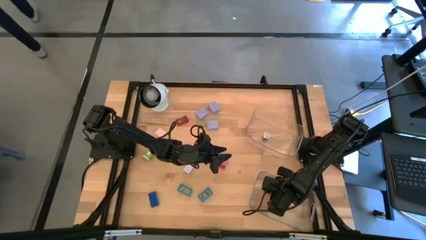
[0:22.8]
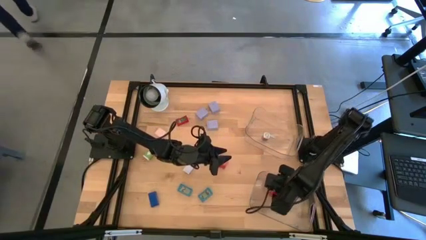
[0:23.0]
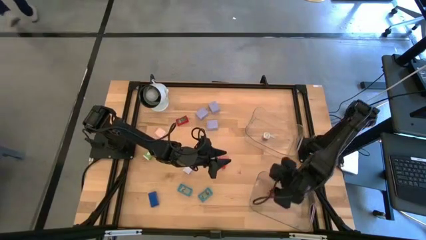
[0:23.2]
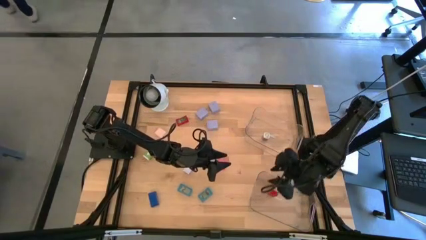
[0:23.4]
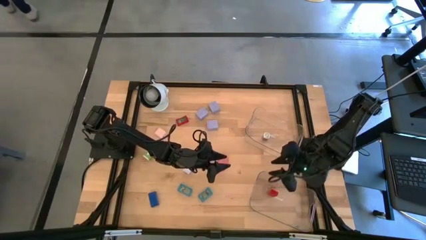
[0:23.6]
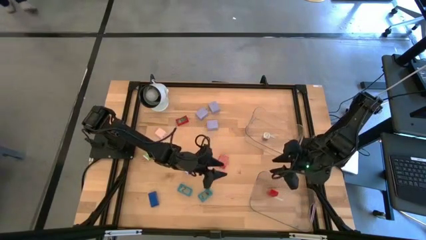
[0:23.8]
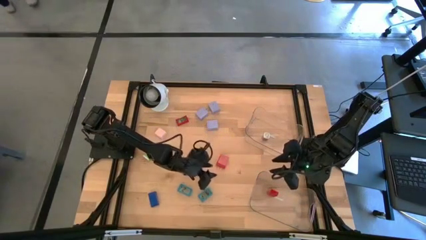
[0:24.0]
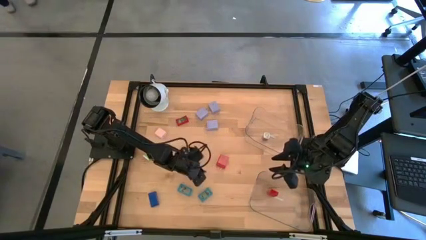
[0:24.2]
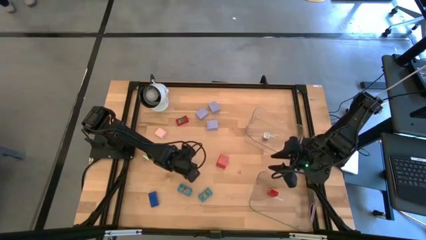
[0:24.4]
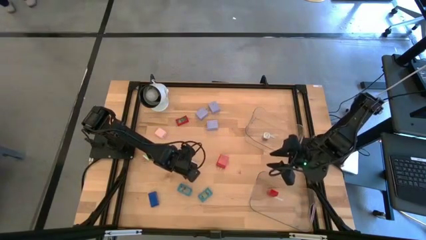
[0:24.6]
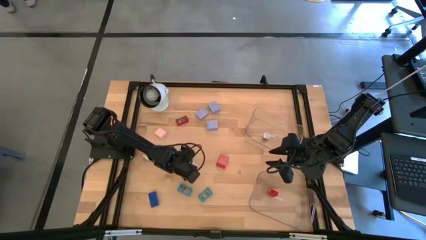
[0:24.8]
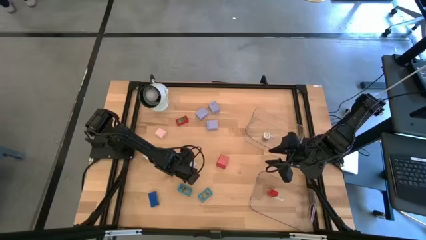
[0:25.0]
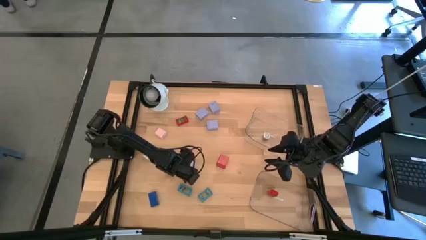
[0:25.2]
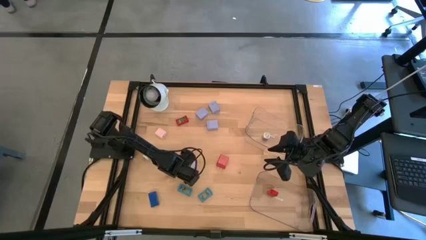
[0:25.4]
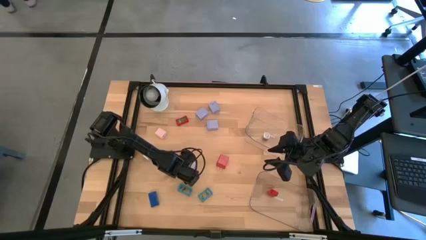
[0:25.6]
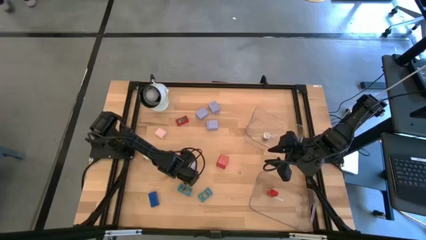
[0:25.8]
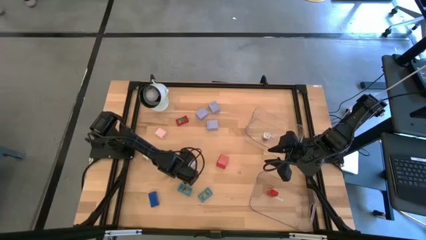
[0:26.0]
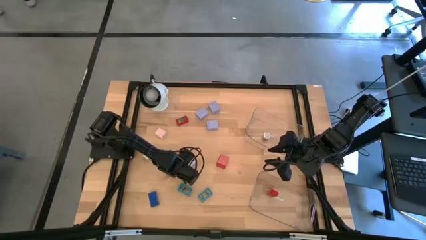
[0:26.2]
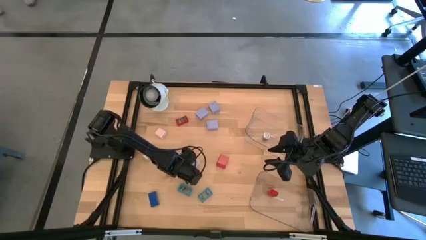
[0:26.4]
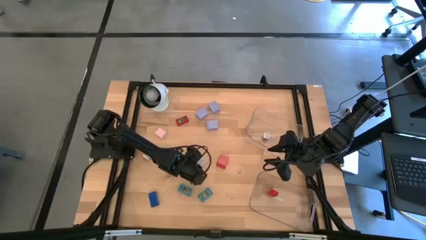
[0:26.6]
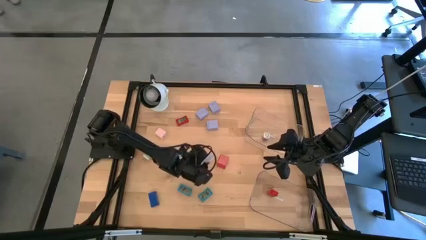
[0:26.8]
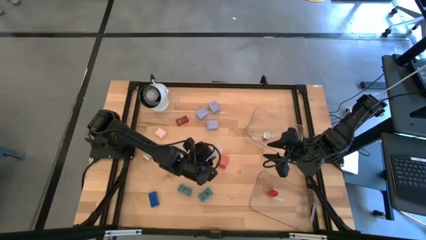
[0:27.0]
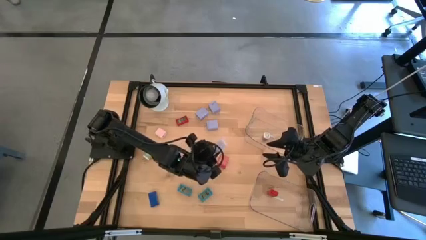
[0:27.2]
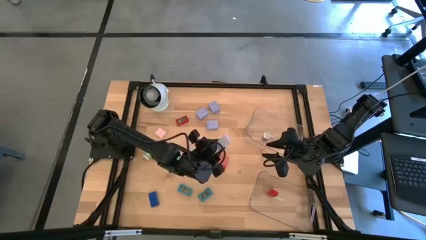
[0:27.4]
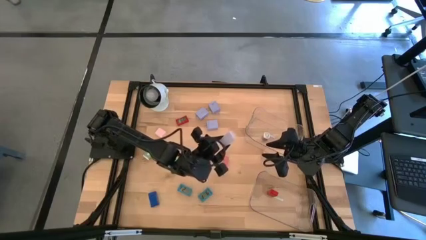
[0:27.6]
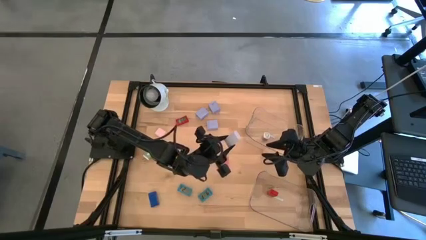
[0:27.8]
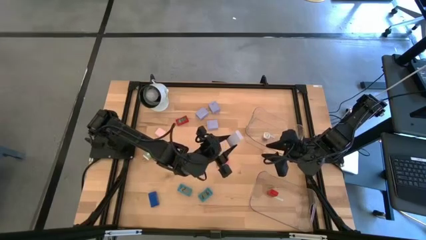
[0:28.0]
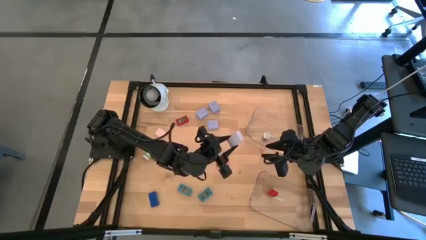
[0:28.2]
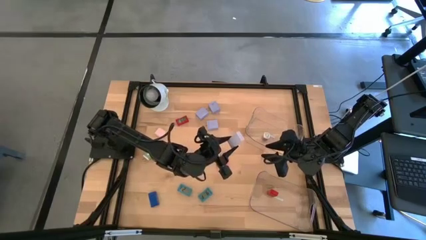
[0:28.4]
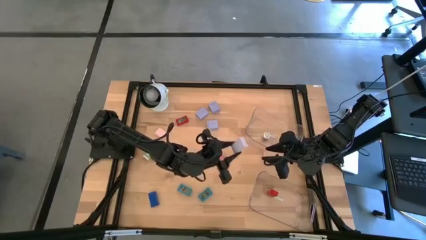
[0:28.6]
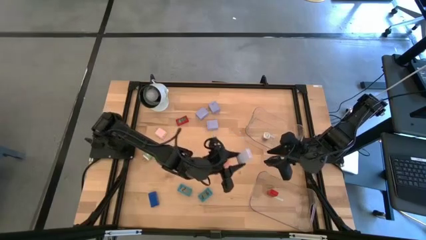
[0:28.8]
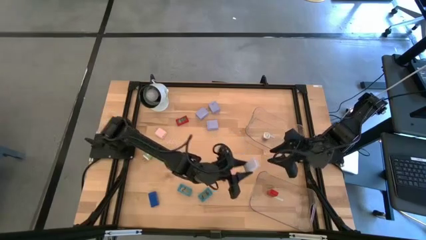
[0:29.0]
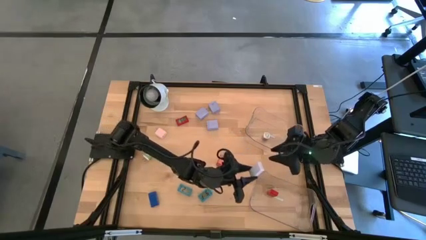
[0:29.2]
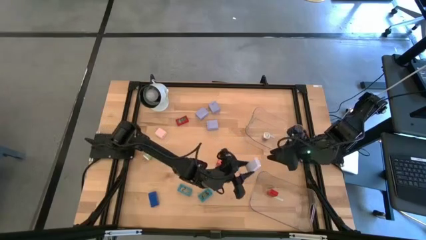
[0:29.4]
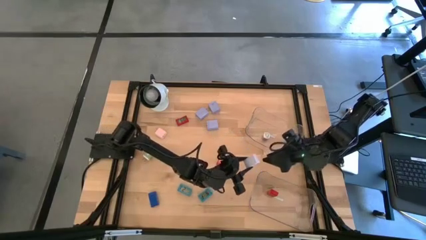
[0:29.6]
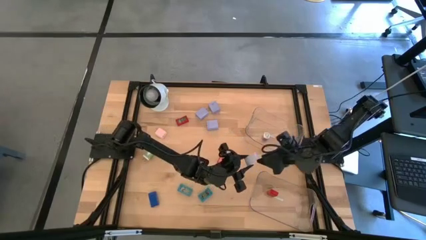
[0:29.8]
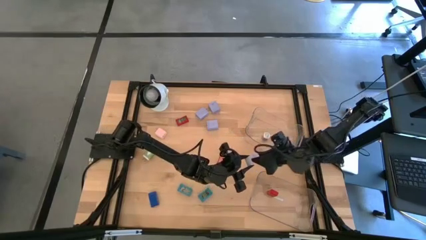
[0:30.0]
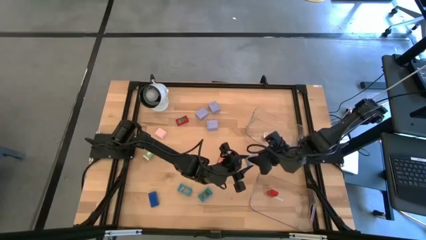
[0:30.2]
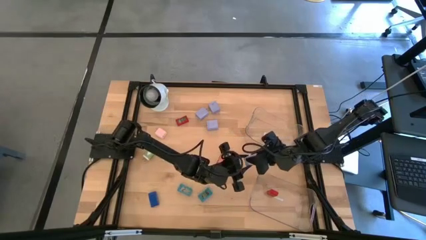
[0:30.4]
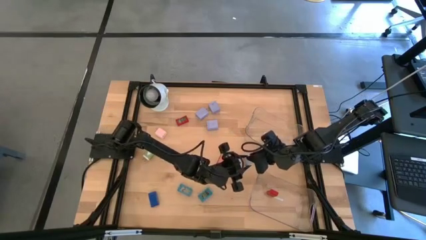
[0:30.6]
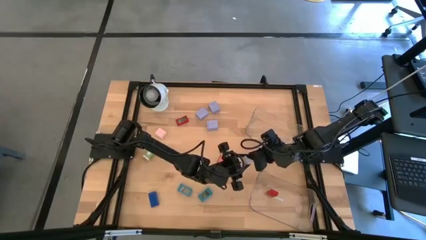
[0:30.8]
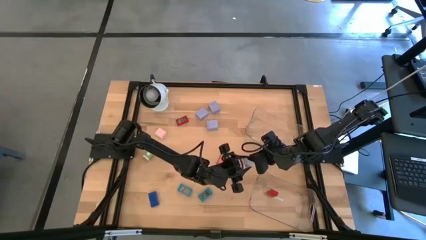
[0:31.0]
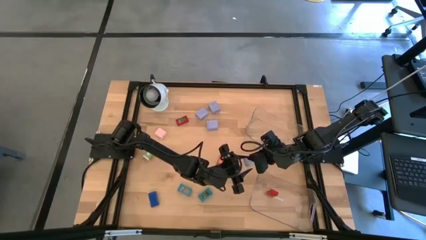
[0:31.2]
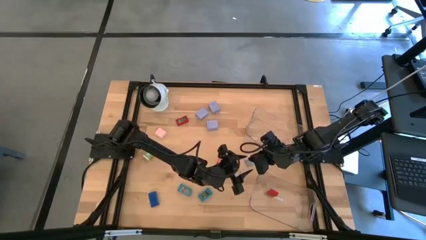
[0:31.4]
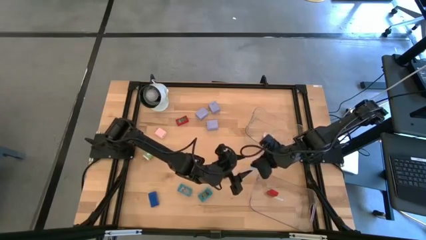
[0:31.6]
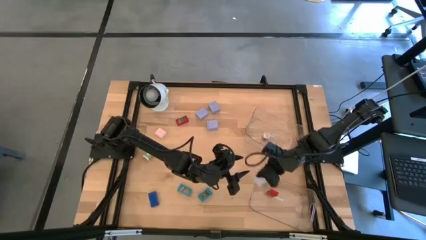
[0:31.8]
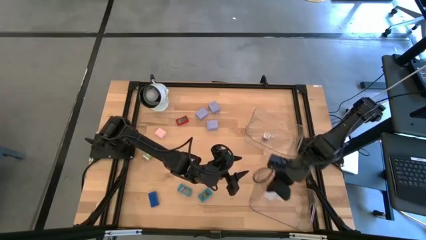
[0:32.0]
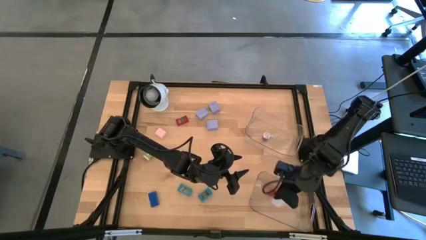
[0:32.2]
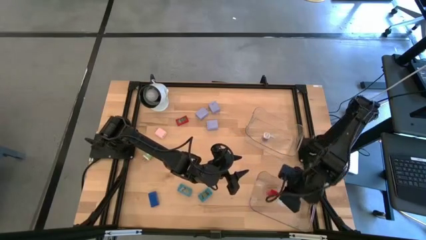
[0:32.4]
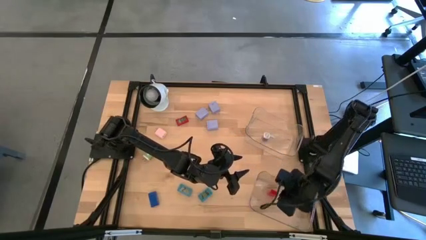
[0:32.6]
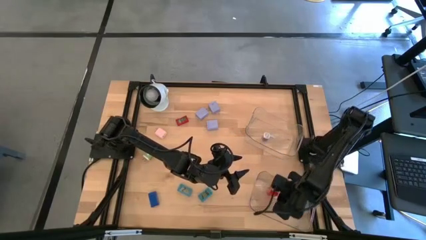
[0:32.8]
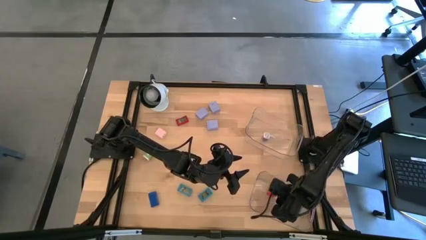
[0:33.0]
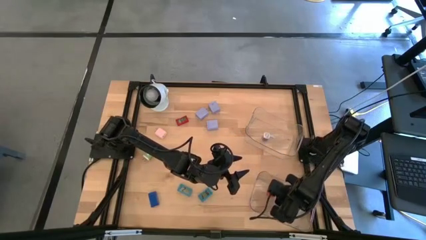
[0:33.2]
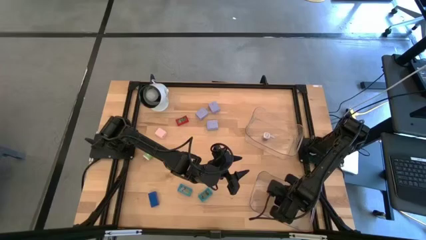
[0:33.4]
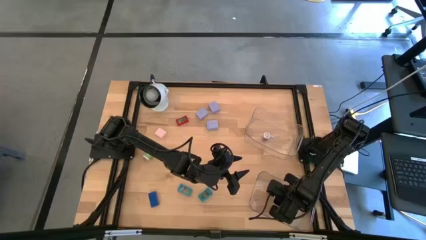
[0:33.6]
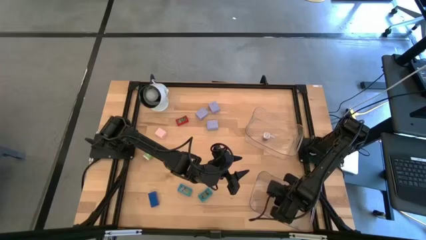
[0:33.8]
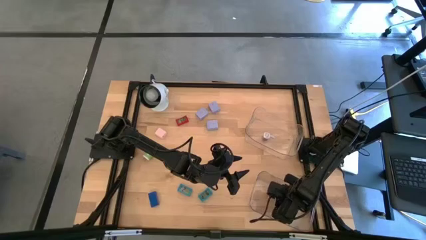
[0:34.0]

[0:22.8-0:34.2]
Task: Pick & Place Office items
Put the white digital clock into the bottom transparent bin

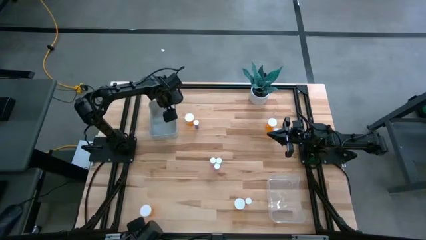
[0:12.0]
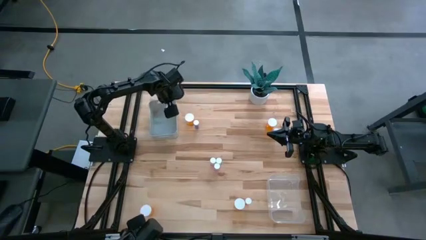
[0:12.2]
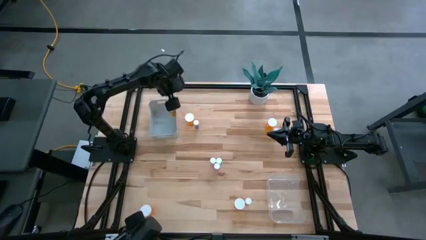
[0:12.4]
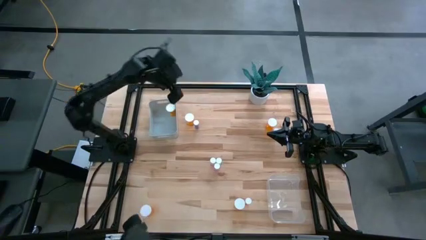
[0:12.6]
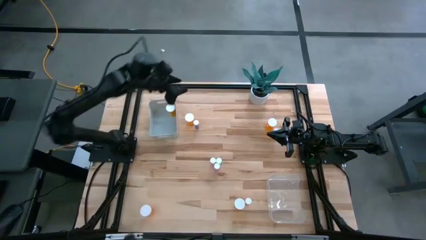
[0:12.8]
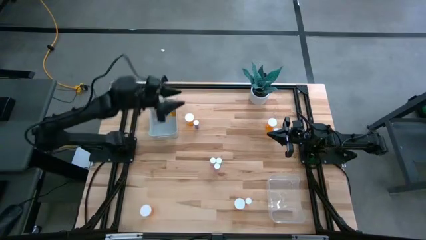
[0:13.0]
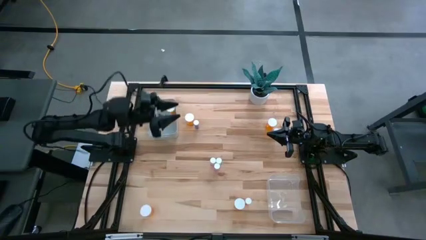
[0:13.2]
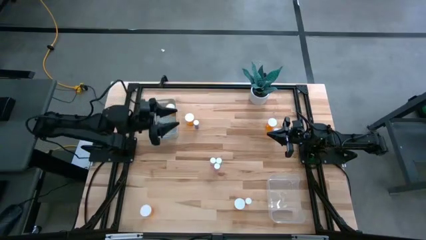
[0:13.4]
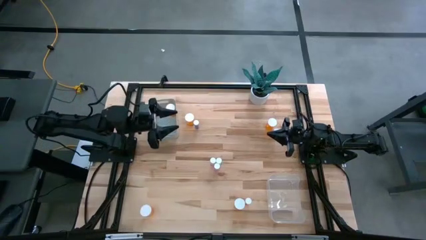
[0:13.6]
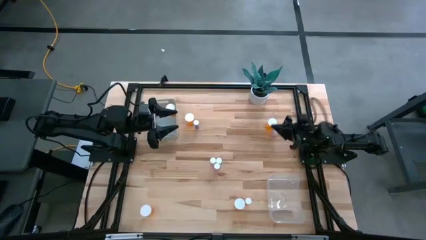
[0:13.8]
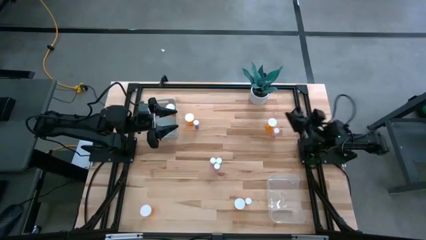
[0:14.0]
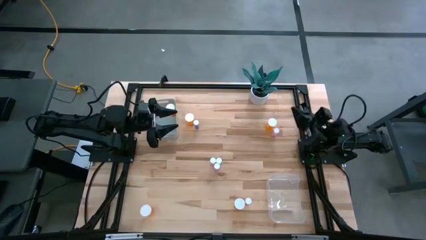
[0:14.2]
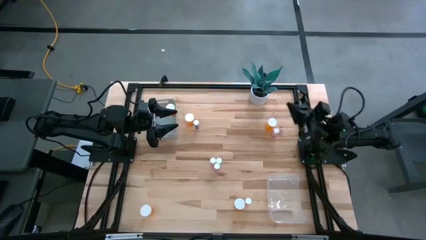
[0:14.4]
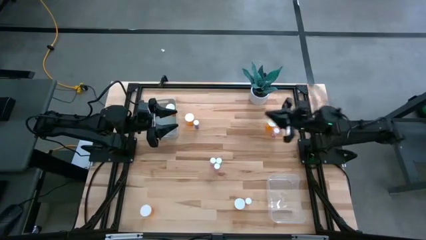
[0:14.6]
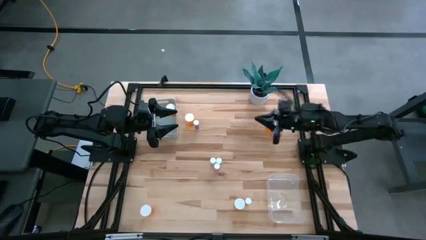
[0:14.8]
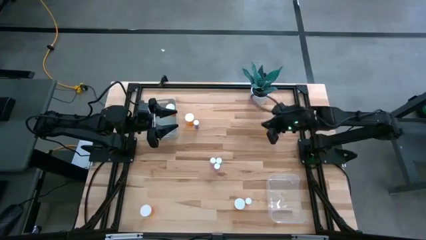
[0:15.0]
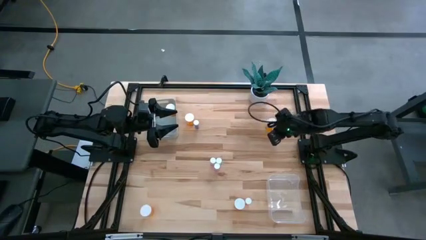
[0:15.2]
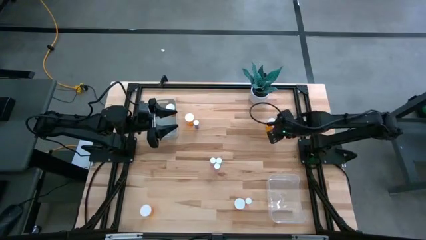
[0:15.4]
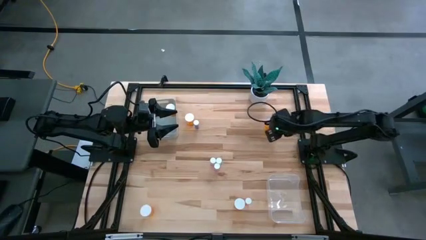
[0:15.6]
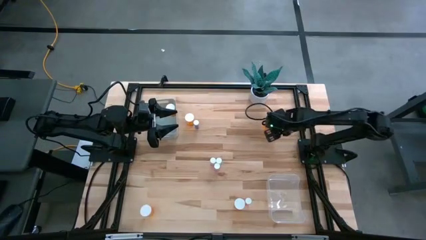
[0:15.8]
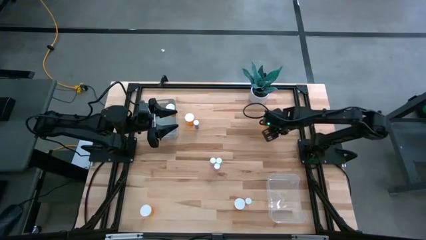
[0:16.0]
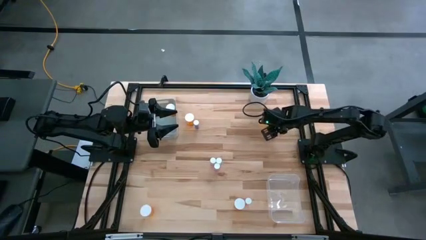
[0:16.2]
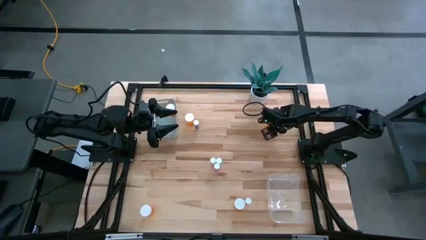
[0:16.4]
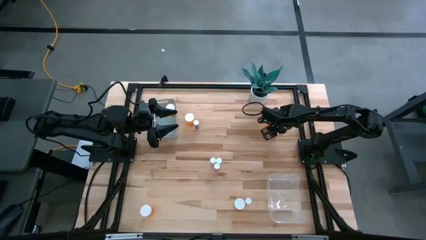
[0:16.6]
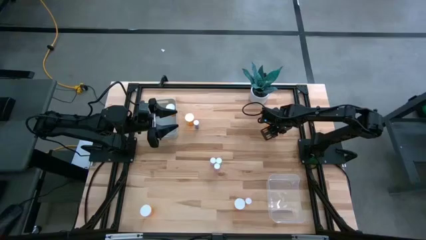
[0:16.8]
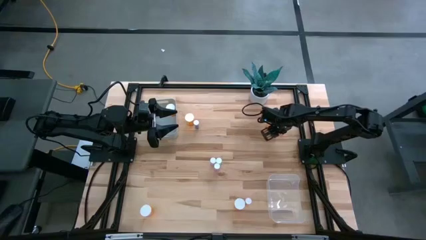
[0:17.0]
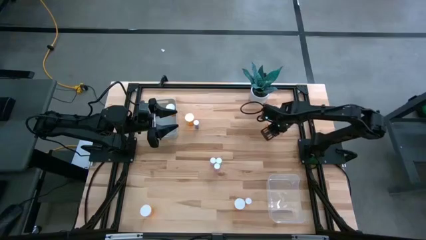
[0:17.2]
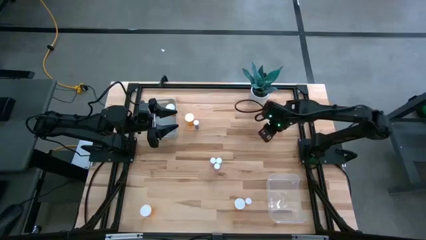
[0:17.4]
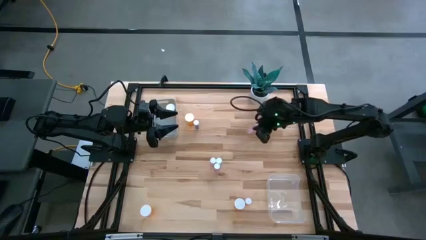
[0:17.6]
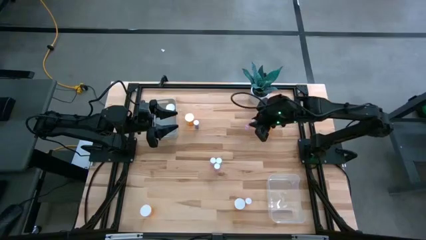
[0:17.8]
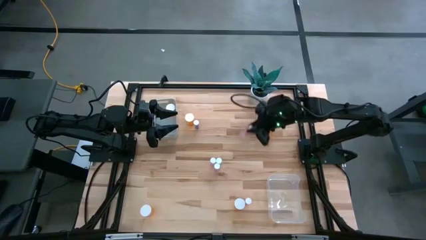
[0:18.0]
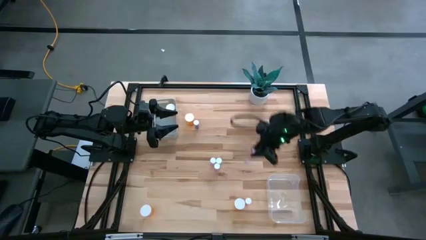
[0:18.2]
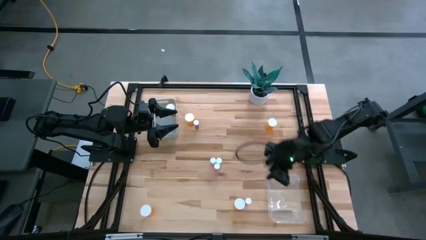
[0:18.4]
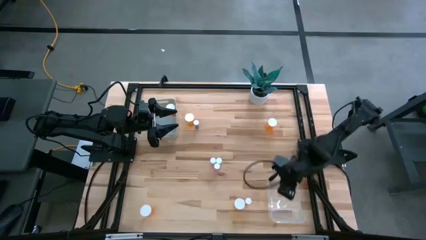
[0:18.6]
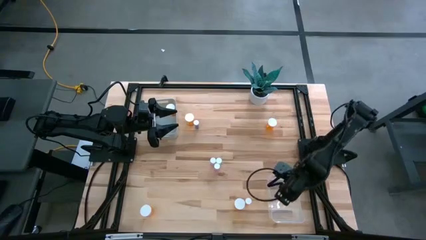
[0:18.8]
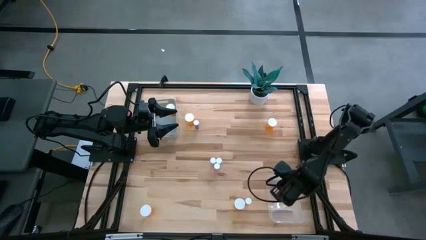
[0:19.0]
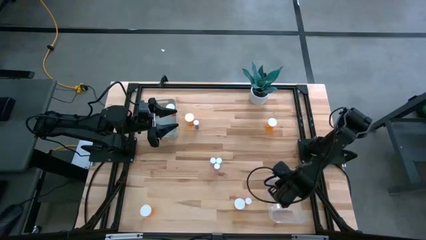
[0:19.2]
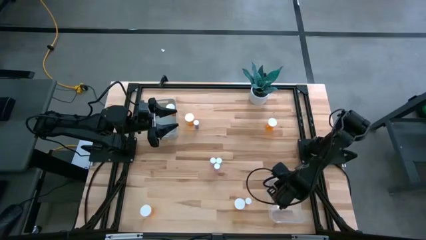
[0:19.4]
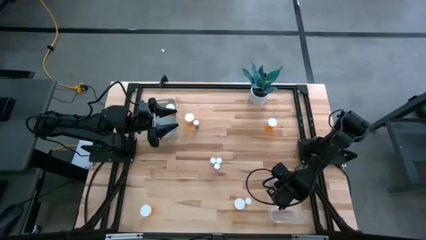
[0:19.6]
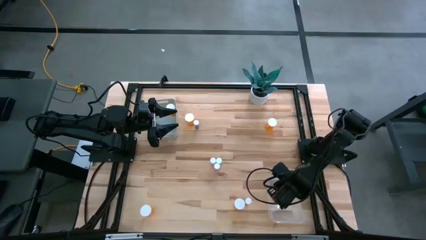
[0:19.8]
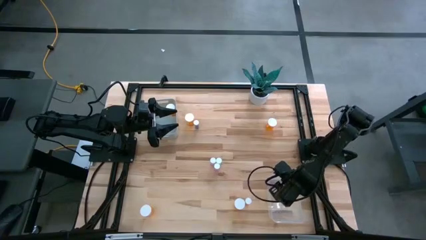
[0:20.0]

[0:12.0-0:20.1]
Task: Pick and place medicine bottles into bin by pill shape (circle, oval)
Put the pink tablet bottle into the transparent bin
